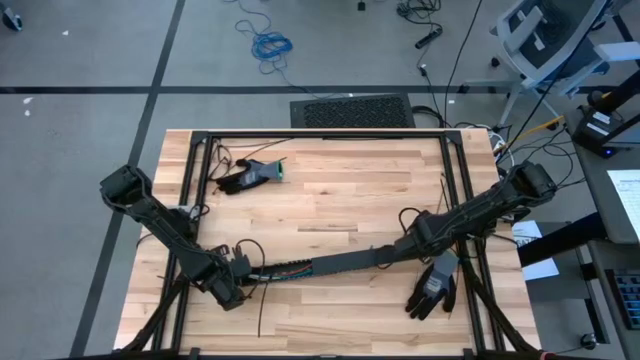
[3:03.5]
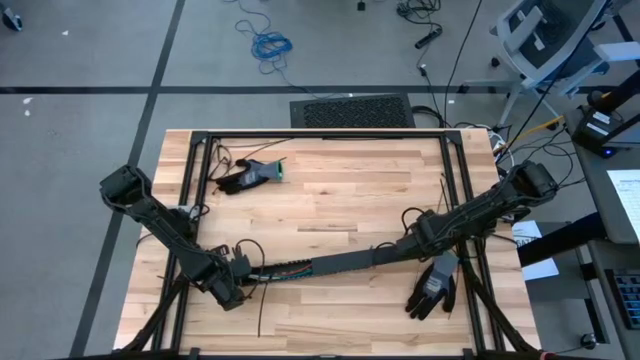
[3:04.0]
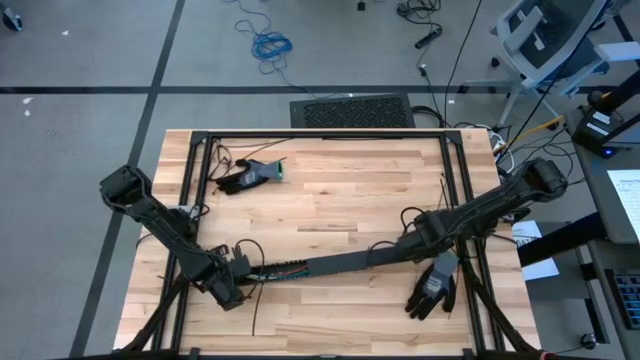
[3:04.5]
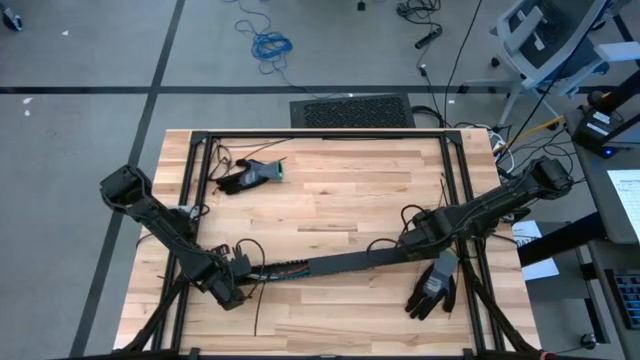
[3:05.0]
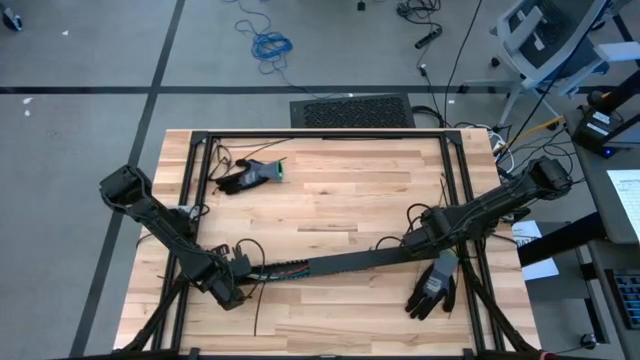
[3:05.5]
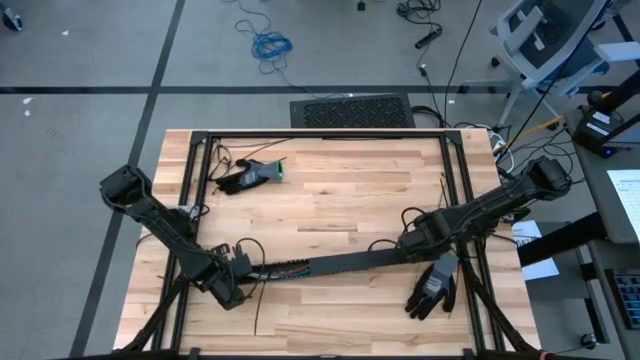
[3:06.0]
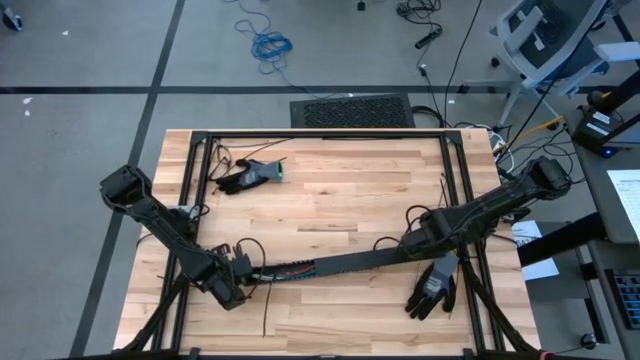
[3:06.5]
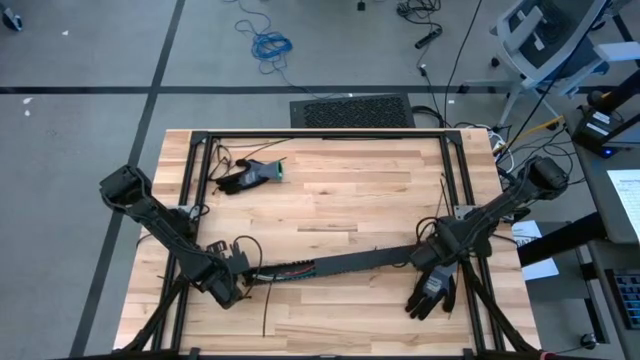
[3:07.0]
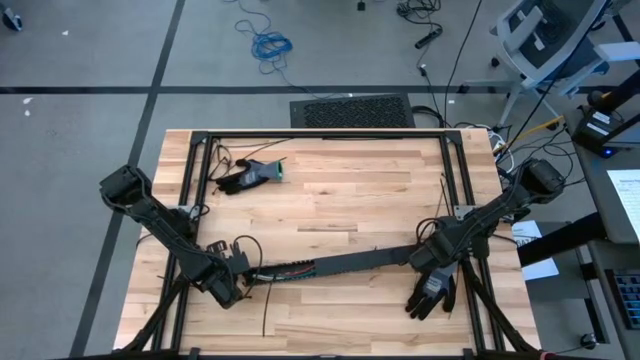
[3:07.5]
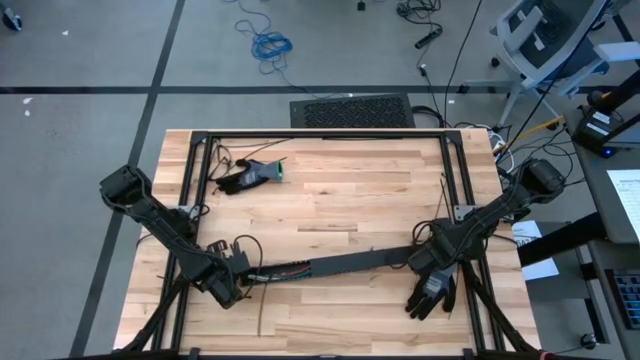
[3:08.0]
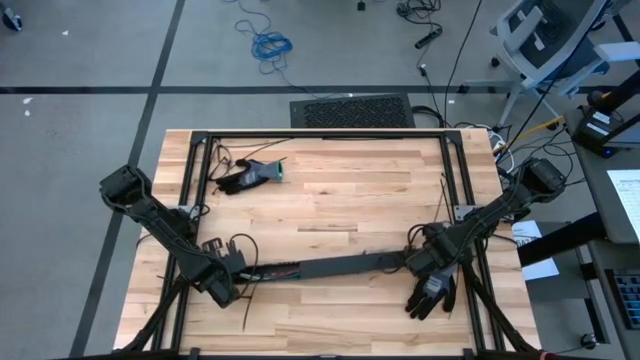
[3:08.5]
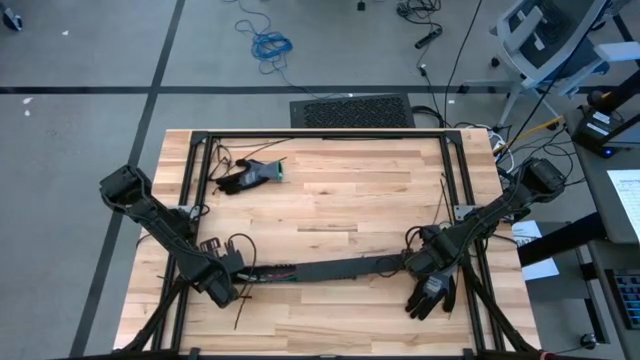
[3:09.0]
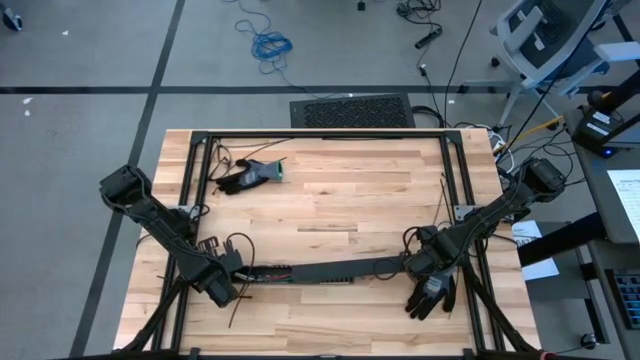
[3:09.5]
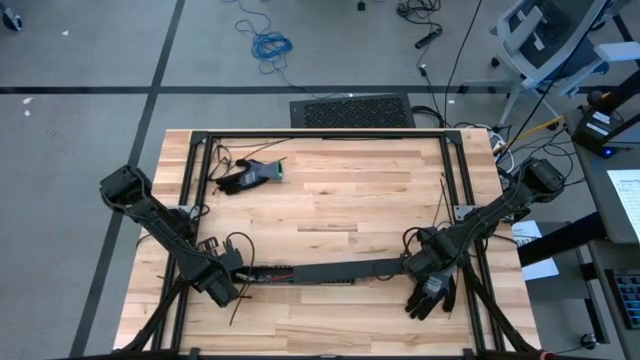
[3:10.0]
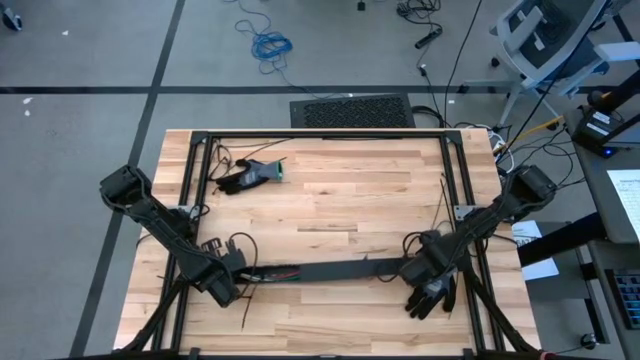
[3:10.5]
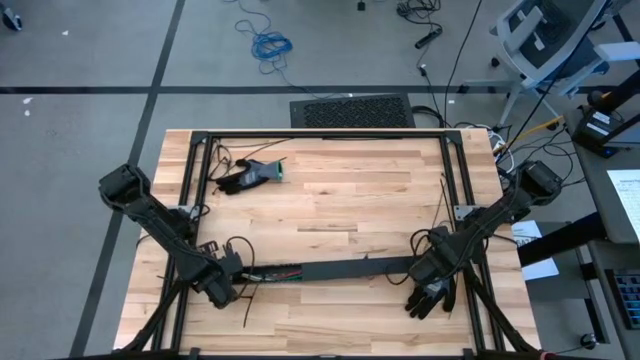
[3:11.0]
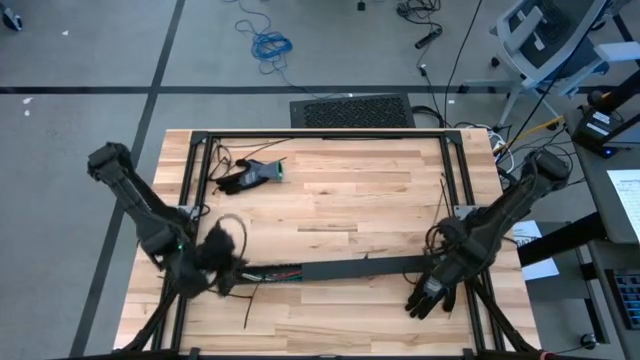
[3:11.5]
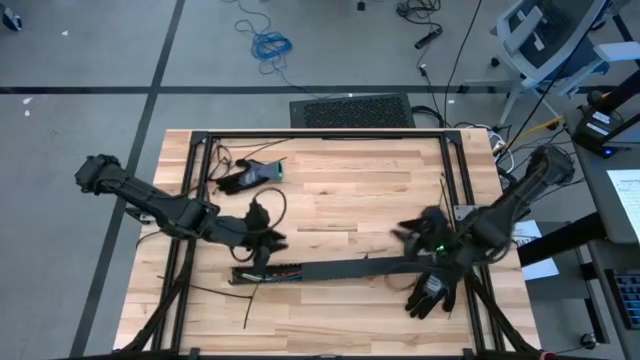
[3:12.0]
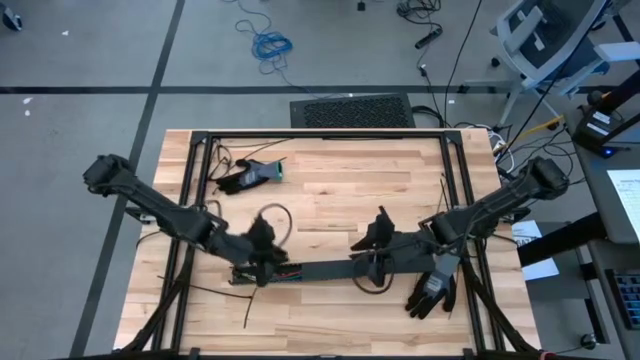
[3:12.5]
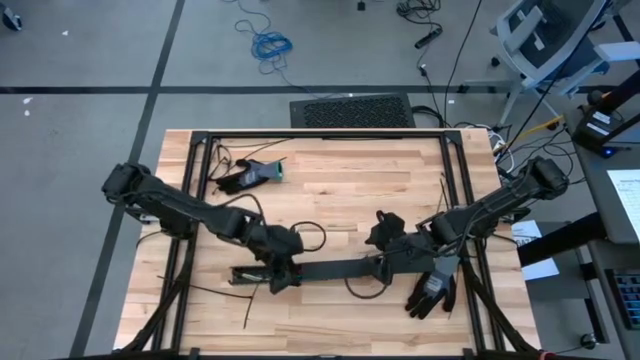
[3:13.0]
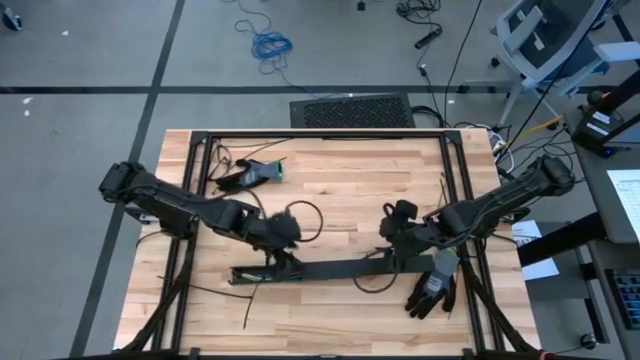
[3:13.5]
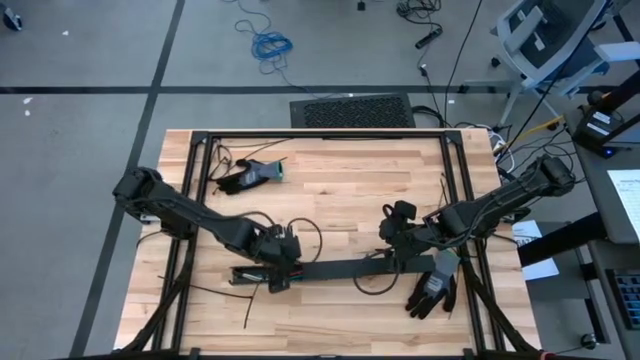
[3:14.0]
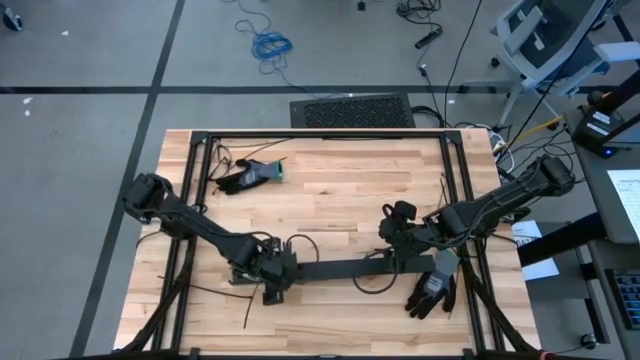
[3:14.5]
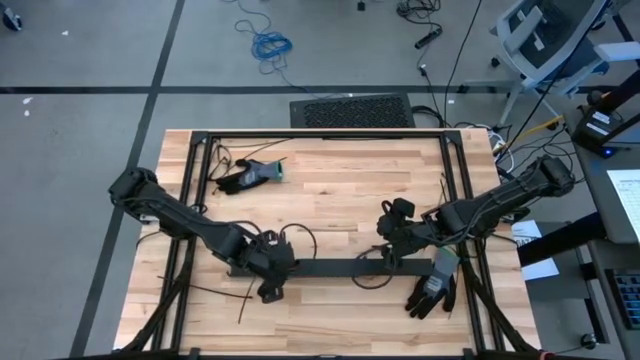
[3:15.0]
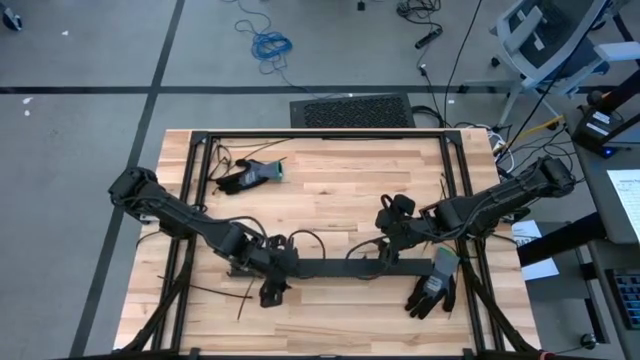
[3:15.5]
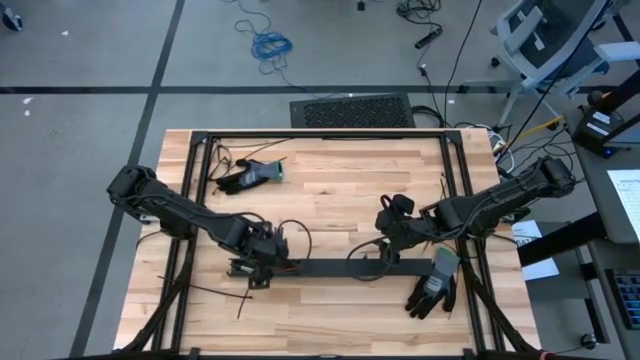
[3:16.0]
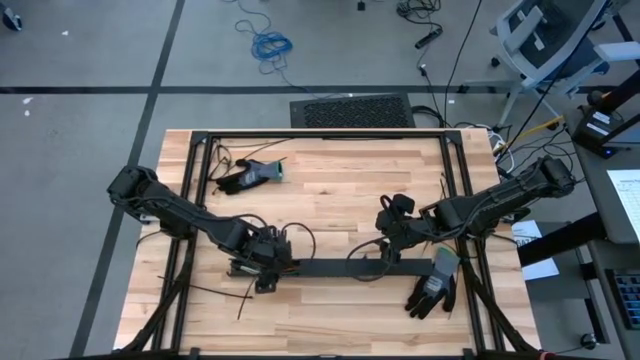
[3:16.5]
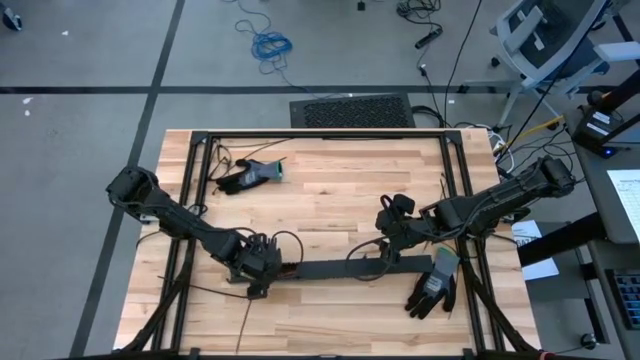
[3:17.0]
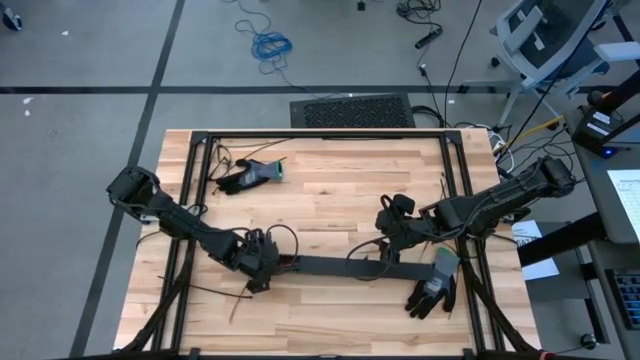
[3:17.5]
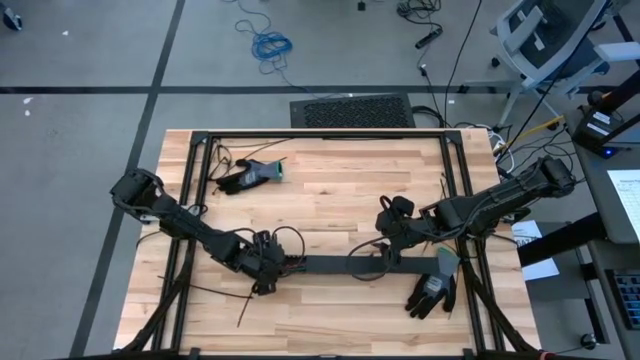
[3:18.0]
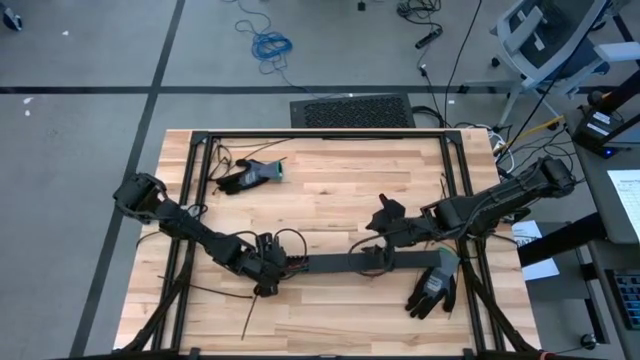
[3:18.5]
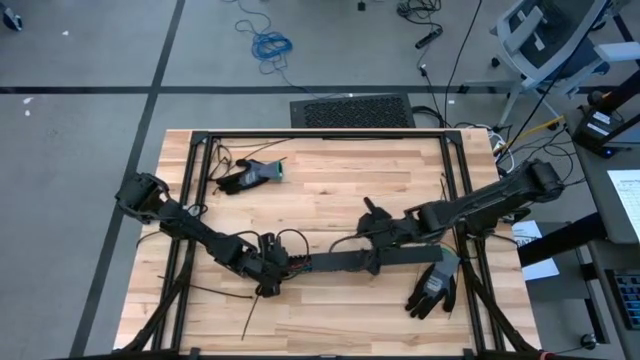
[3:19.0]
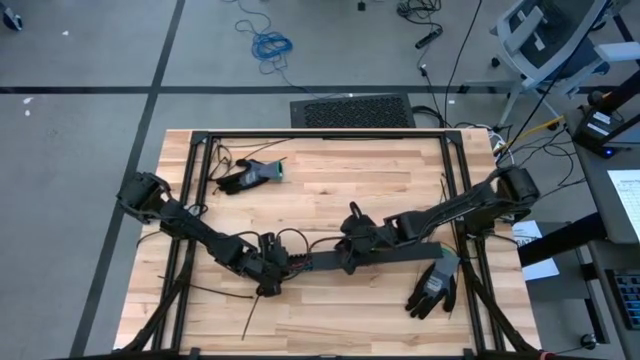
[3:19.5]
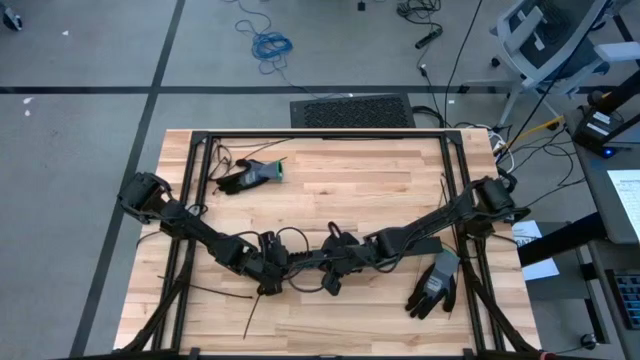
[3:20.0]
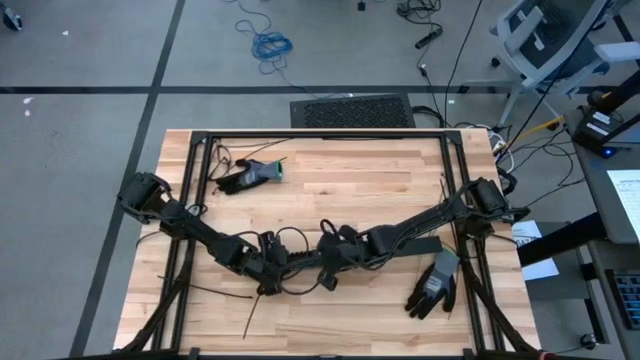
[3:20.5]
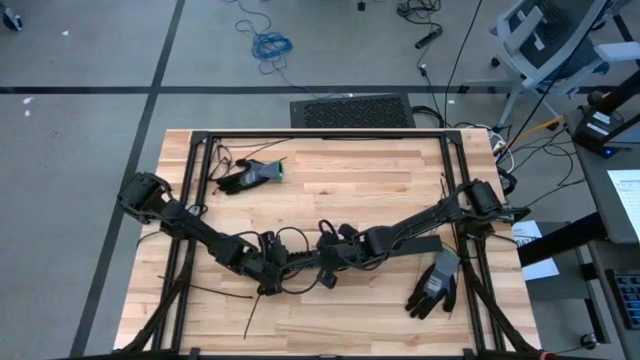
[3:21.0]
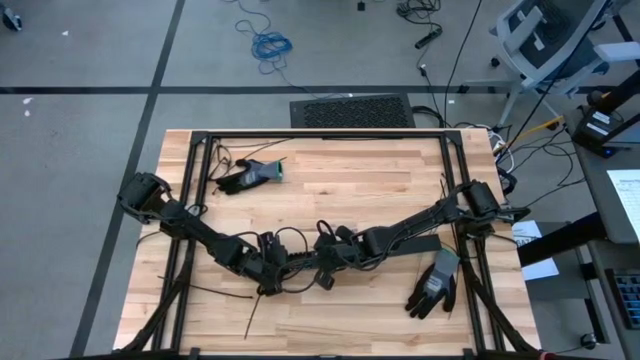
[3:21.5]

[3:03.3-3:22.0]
Task: Ziptie cables
Close the black cable duct

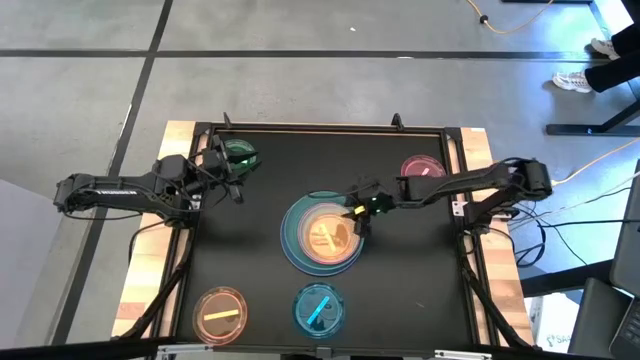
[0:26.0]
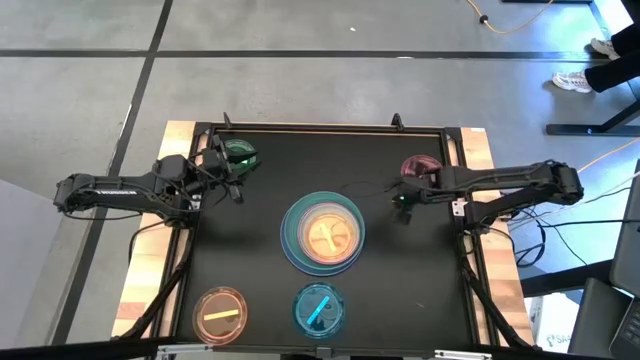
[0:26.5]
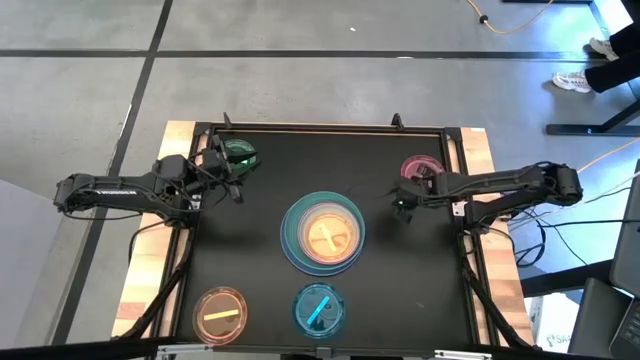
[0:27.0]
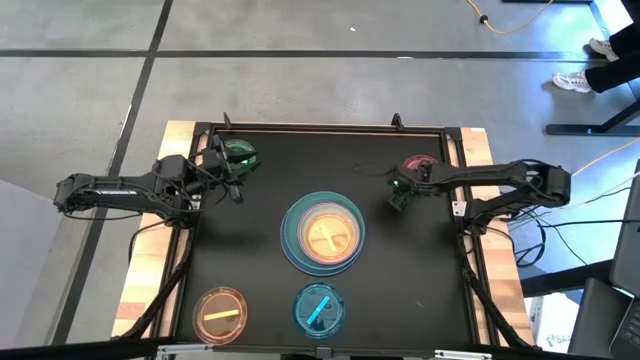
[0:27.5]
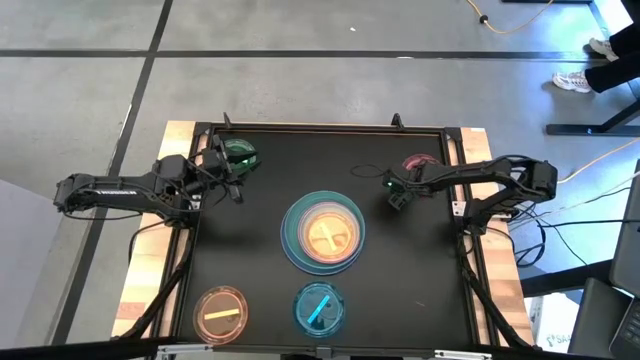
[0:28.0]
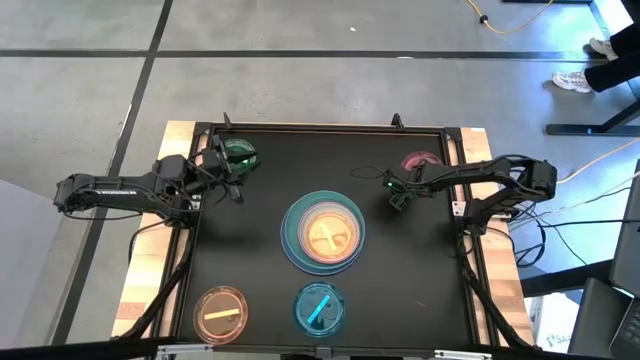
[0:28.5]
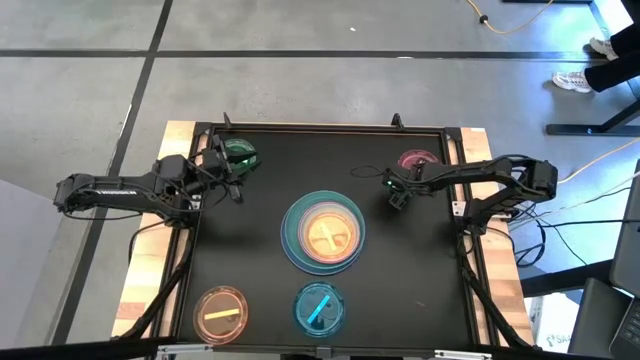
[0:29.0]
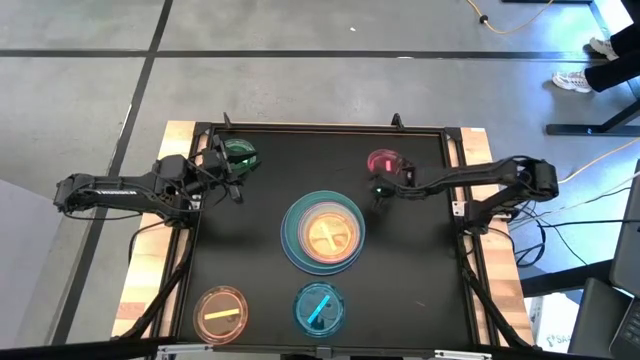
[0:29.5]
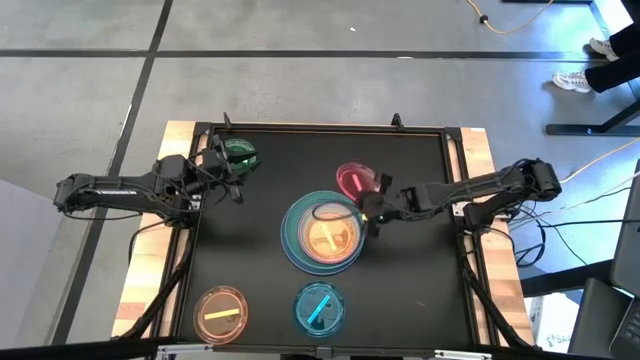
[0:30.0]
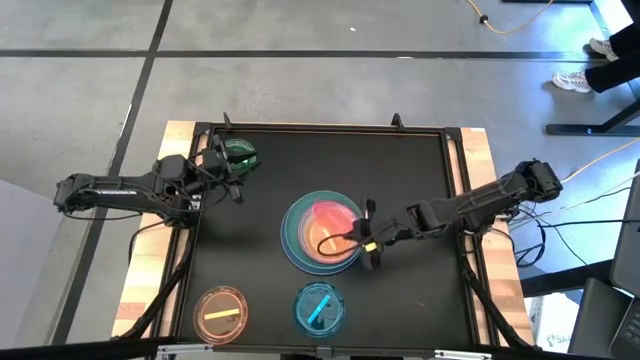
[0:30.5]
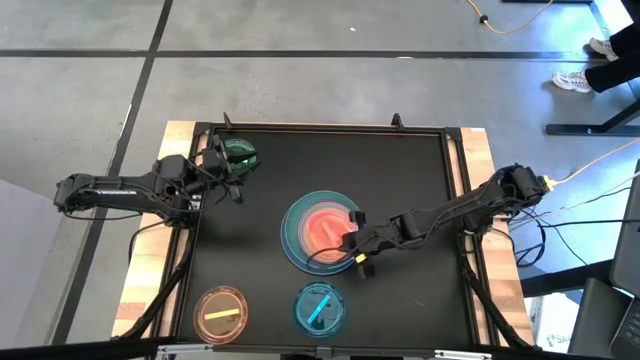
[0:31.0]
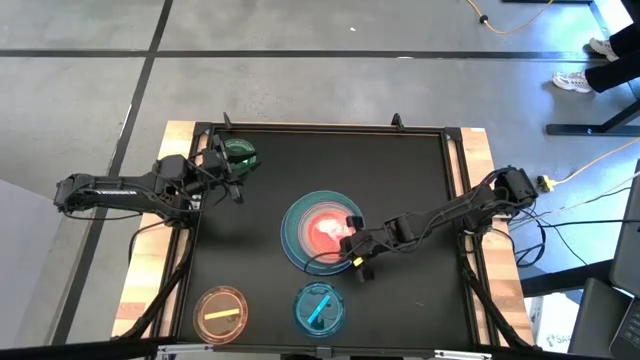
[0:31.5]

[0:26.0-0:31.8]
Task: Stack plastic plates
Stack the light pink plate on top of the orange plate
